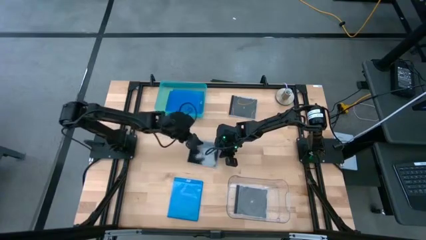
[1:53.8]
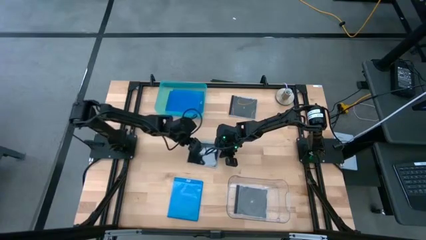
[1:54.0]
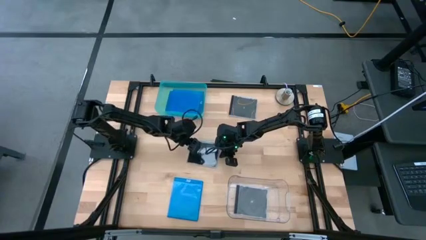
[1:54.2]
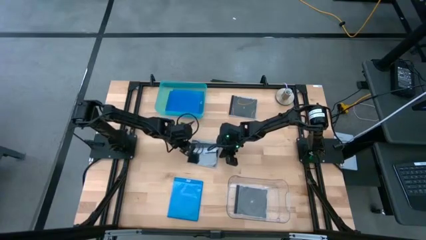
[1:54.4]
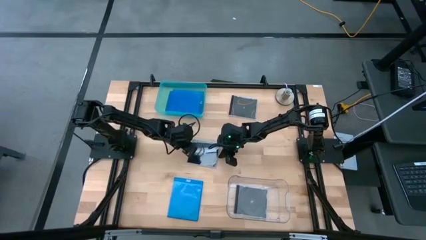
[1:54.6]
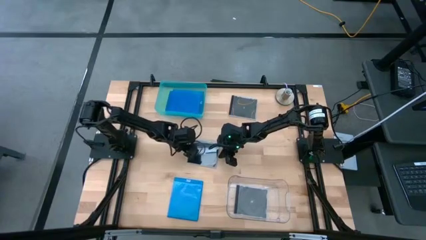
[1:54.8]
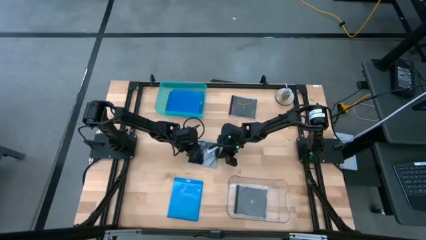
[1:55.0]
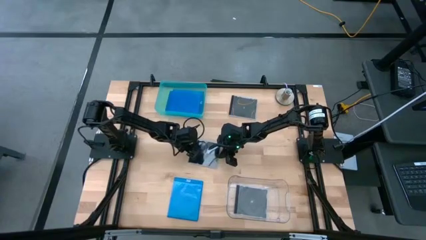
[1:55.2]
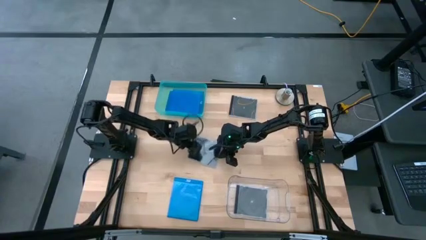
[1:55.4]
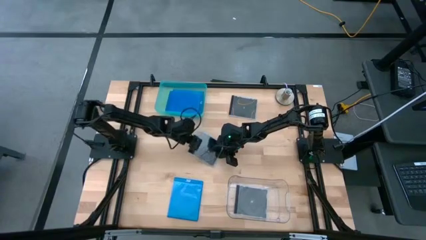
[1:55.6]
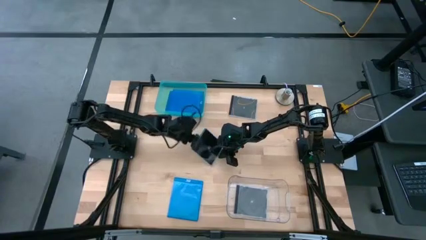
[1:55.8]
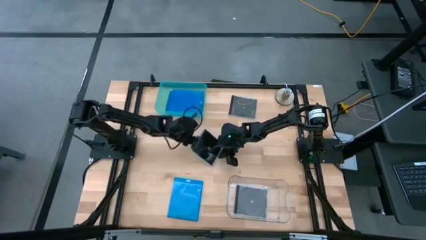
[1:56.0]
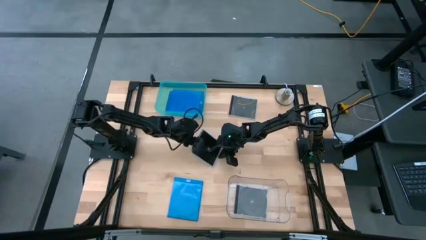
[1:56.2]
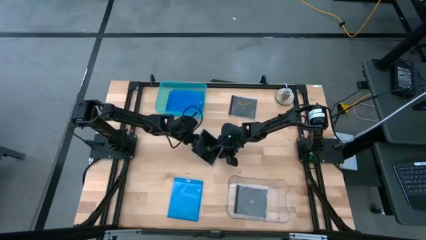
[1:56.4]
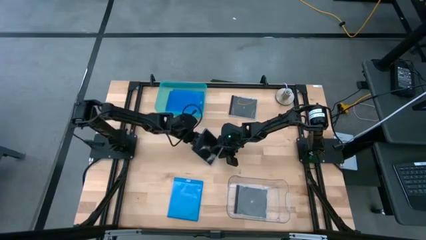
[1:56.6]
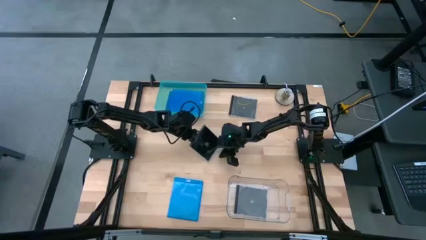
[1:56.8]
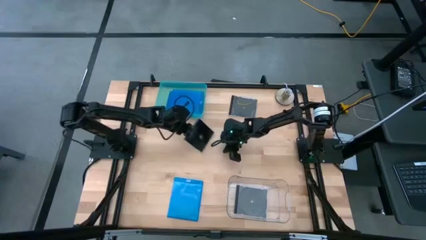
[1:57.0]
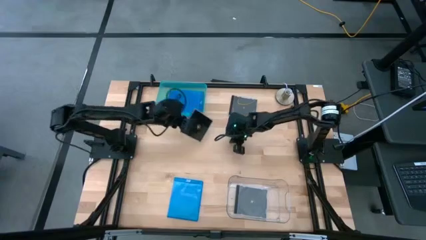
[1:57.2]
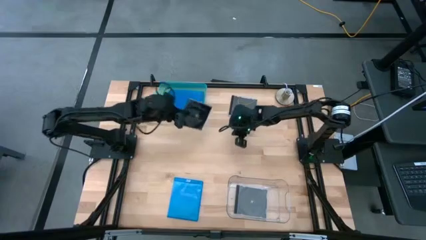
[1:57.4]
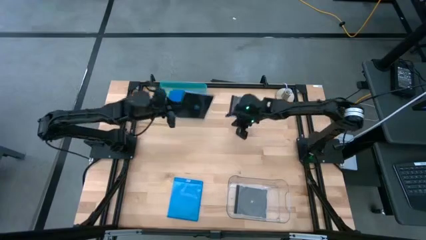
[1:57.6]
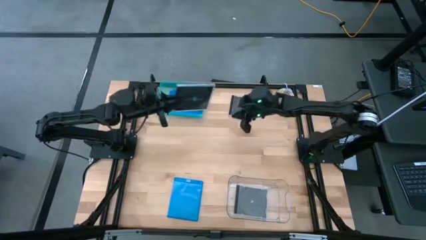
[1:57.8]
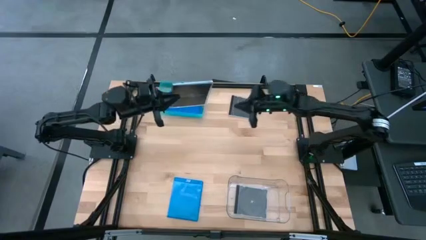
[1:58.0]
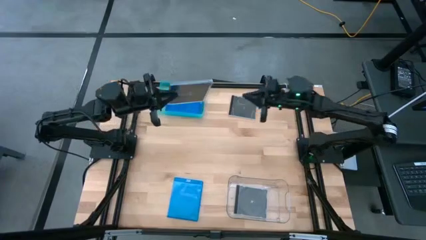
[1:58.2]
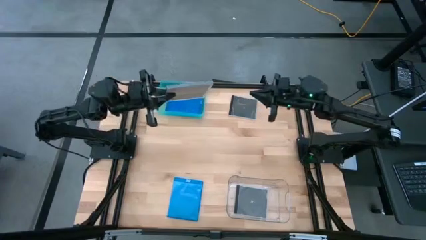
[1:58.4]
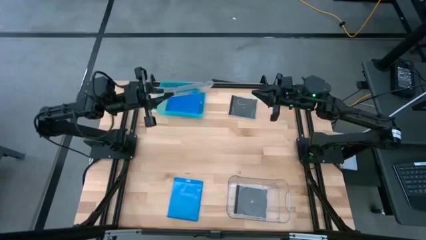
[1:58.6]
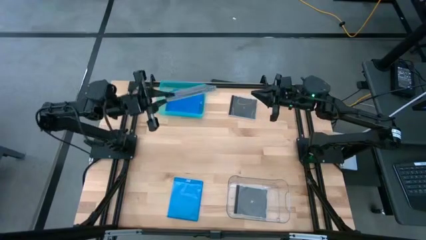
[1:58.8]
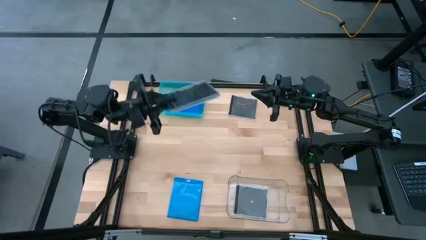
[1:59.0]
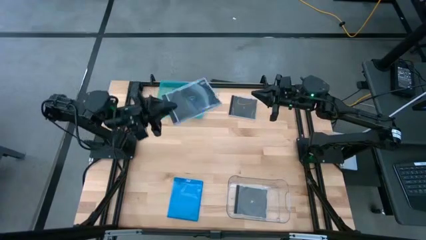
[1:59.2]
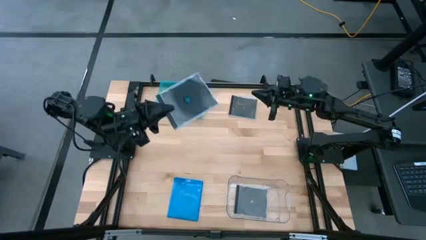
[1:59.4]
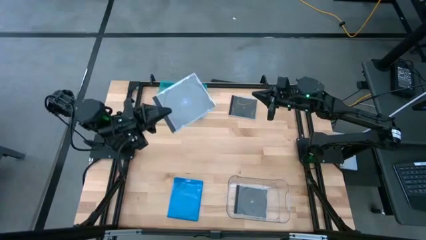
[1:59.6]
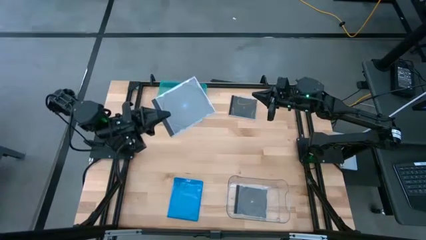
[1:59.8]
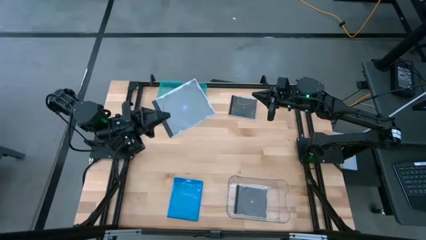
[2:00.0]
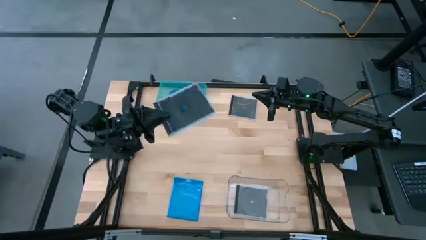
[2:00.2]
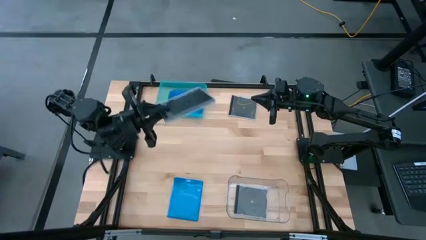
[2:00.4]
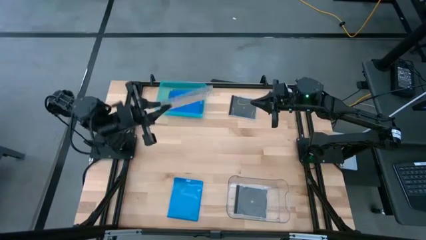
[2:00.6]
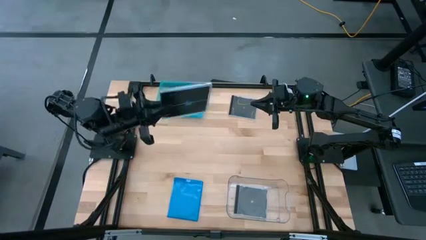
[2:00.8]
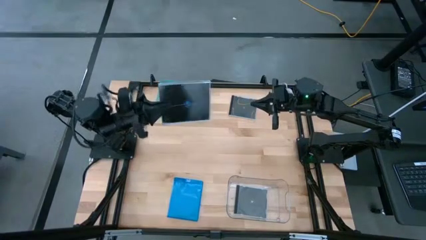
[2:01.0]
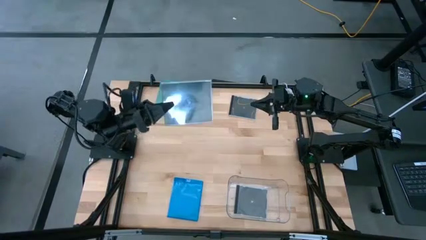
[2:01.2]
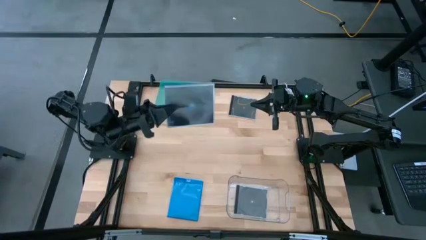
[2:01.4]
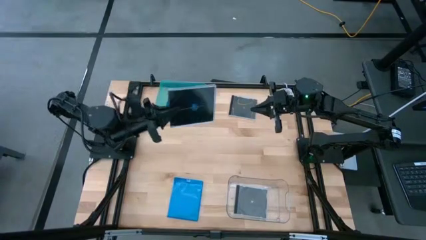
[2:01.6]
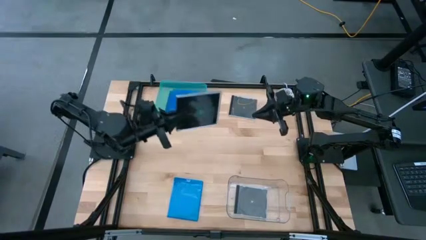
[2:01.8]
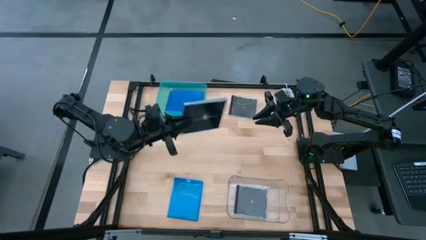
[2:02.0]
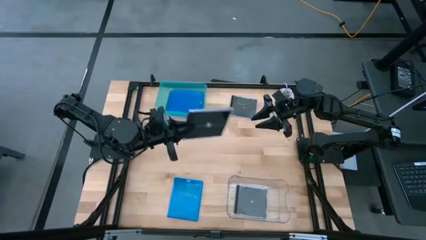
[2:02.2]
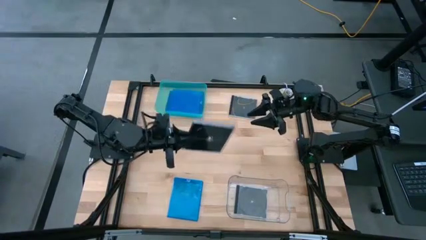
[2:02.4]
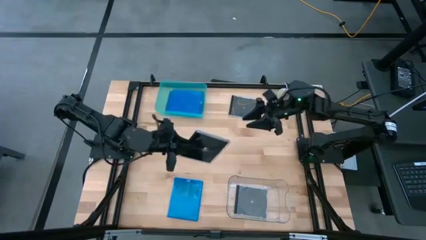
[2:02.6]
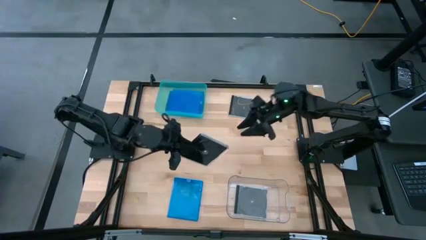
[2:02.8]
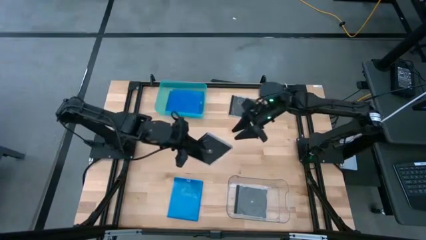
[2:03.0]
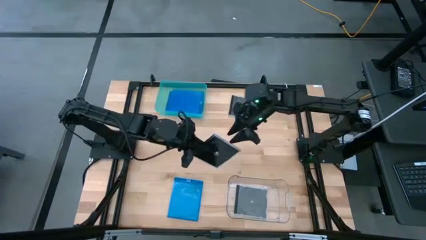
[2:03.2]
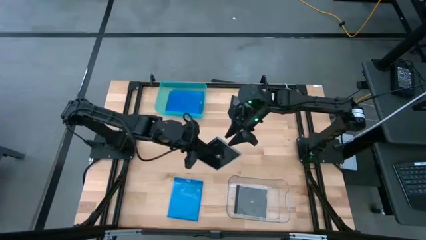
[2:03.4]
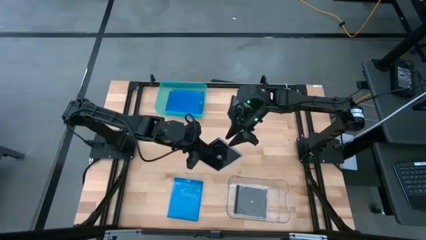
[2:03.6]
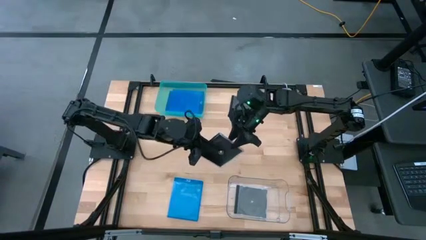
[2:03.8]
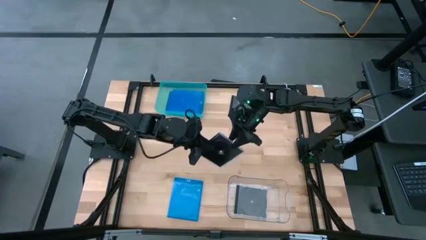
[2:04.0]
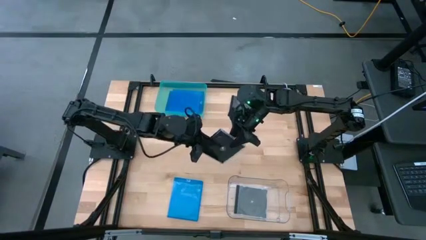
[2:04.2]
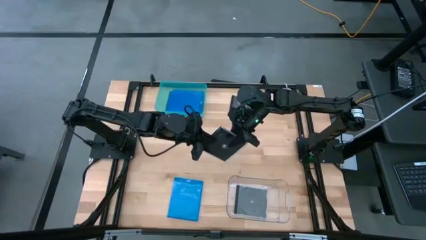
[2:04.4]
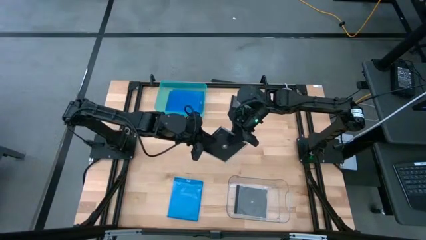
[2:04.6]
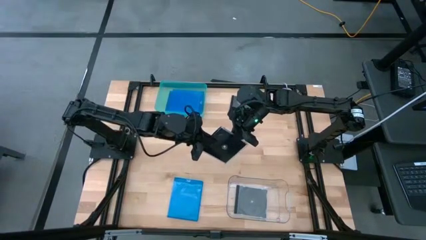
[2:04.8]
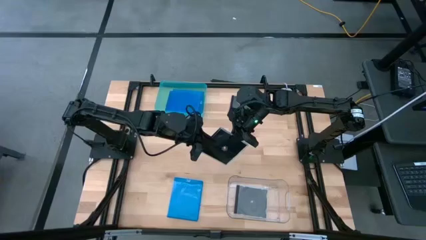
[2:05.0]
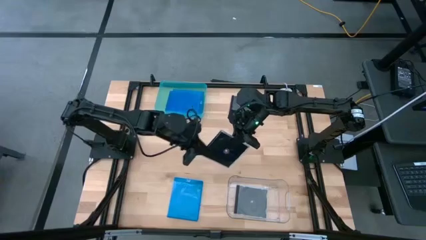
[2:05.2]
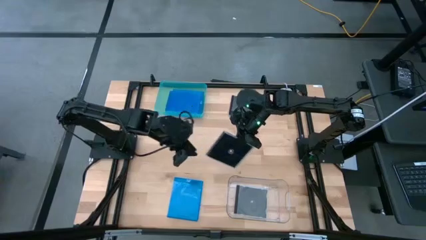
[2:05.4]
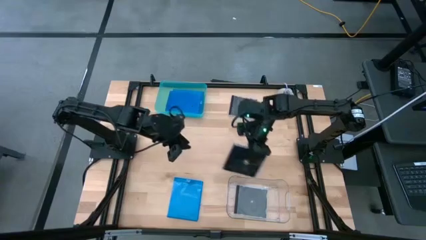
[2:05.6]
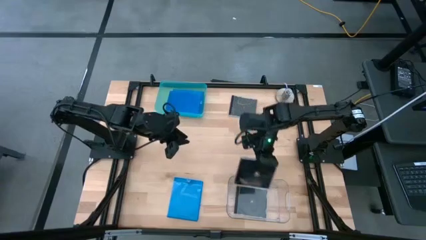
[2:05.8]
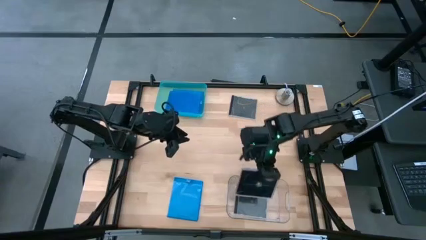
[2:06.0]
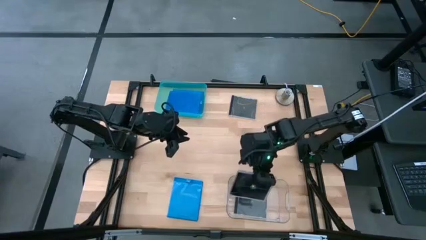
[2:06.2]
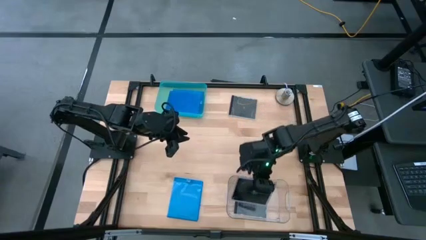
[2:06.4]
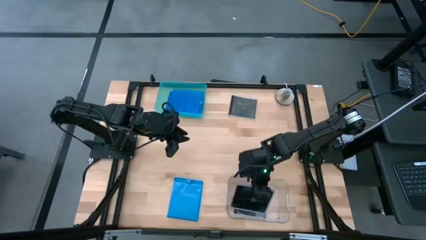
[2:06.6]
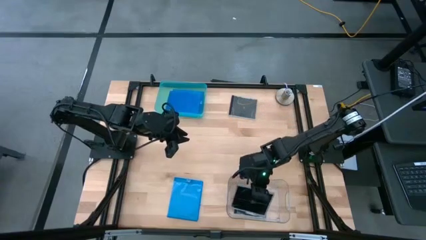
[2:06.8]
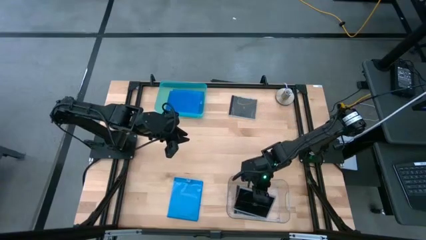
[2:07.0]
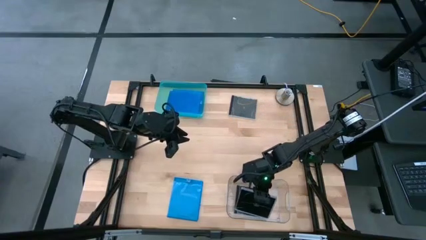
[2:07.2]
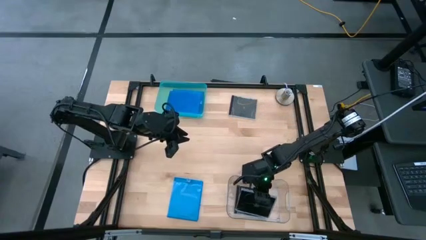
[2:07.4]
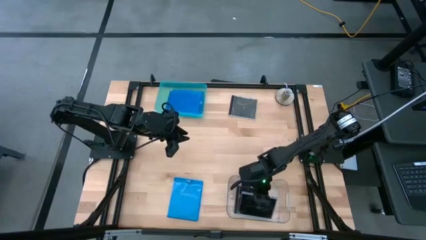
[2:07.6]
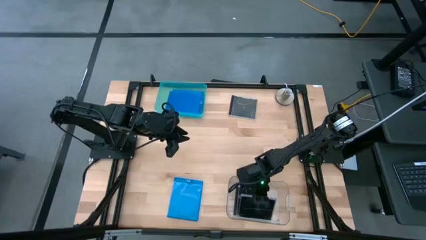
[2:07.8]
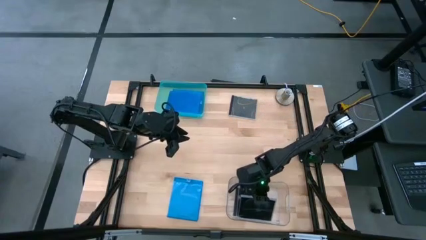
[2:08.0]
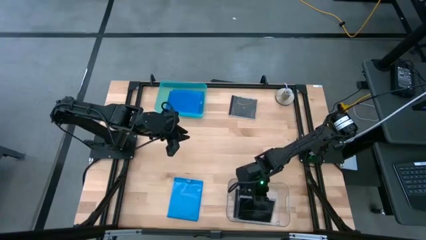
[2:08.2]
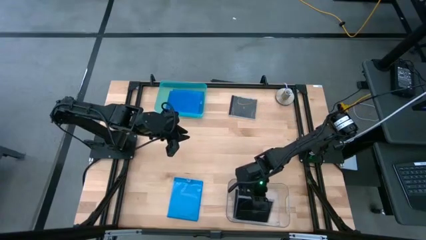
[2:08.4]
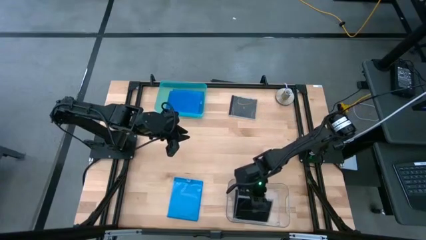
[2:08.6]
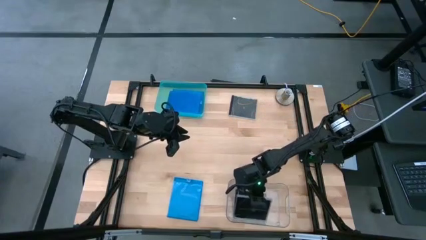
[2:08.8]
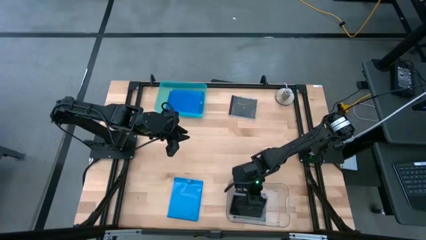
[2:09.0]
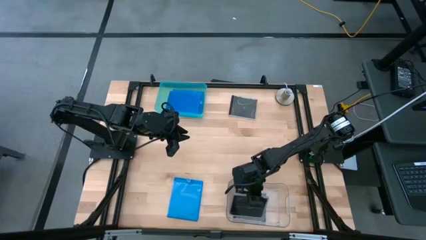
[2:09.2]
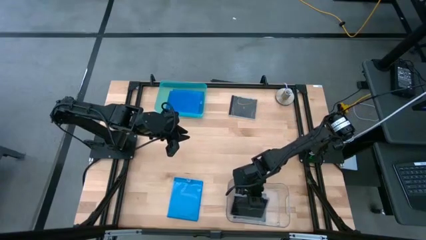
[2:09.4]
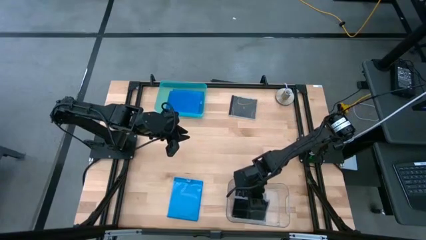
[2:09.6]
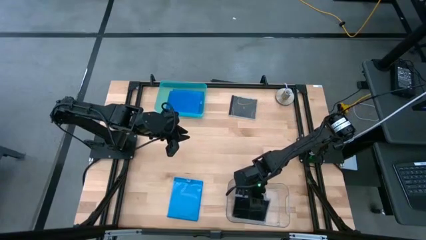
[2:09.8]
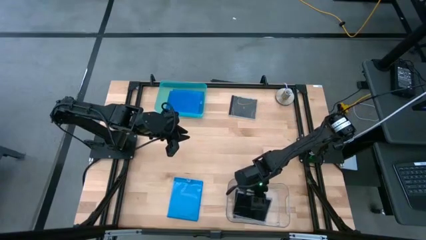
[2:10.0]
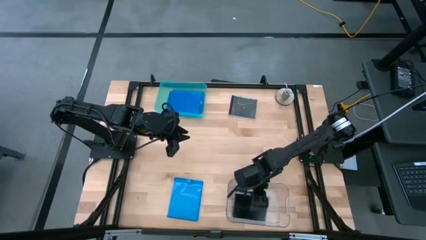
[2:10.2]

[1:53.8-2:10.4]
Task: Pick & place jewel cases by type
Put the bottom black CD case into the transparent bin
